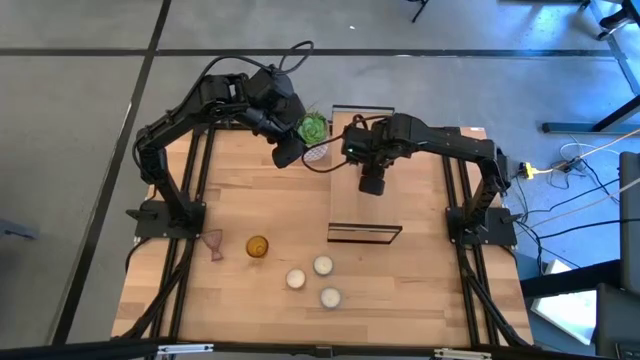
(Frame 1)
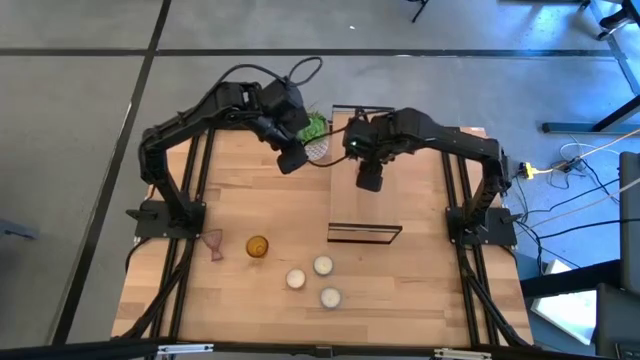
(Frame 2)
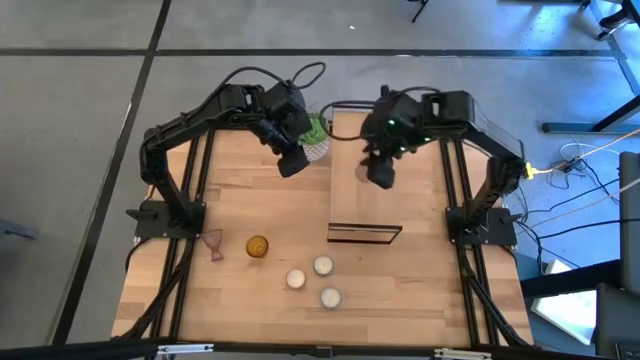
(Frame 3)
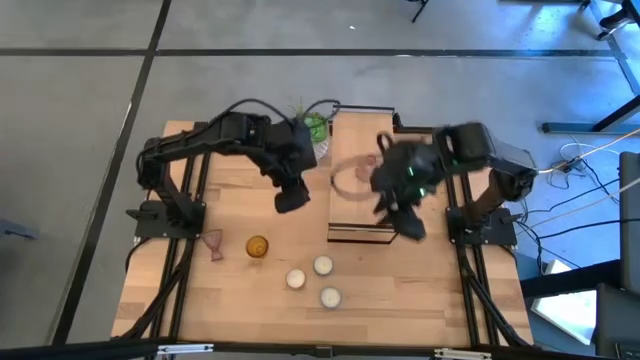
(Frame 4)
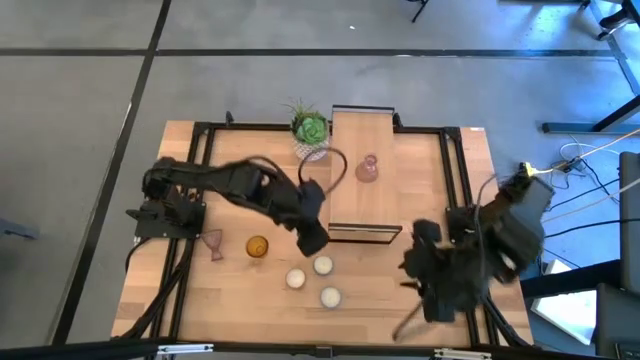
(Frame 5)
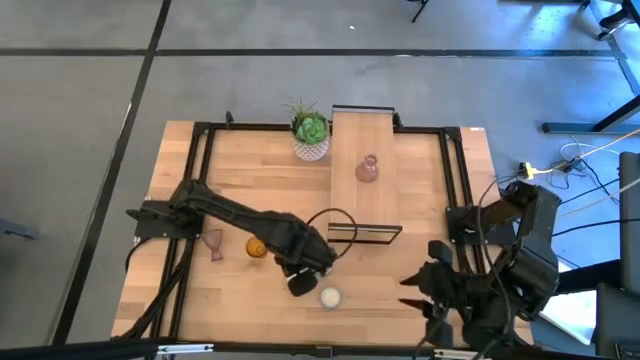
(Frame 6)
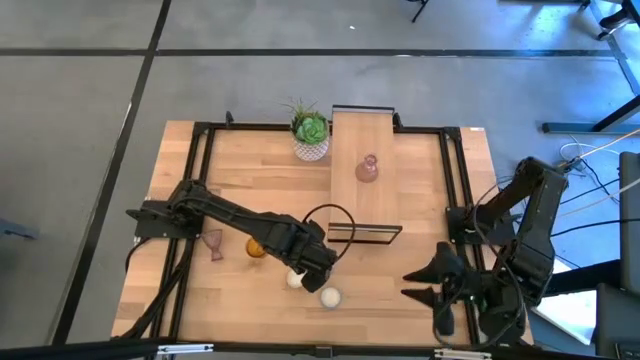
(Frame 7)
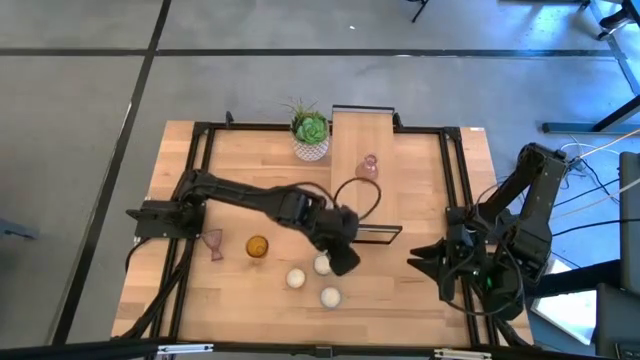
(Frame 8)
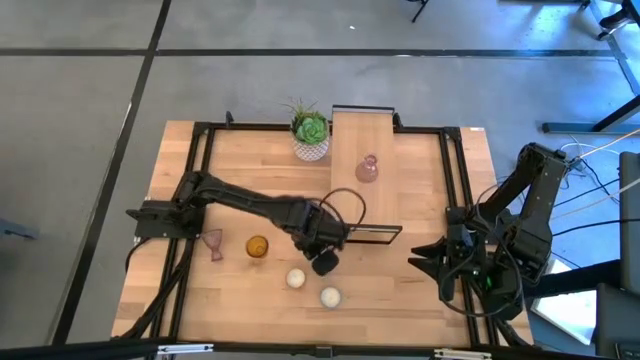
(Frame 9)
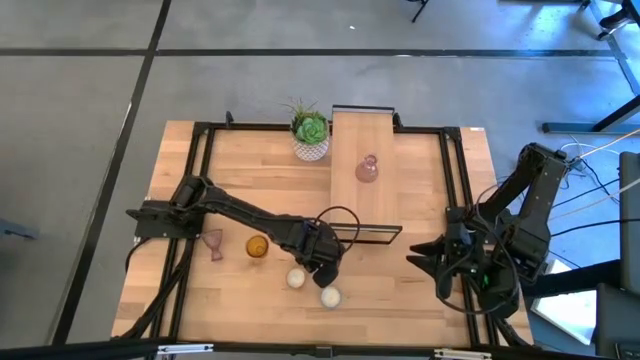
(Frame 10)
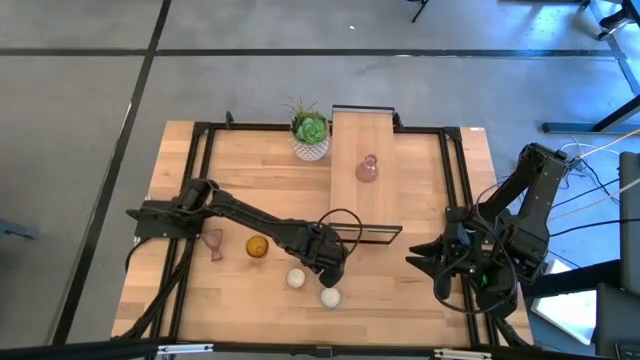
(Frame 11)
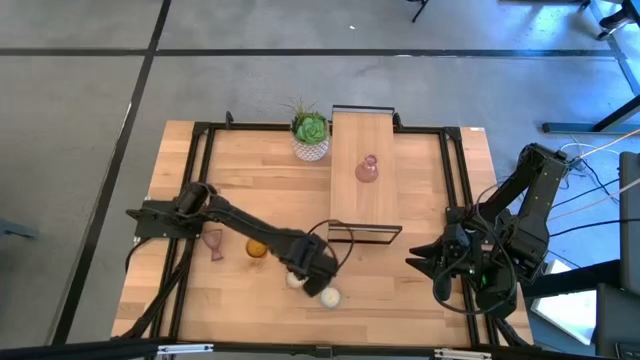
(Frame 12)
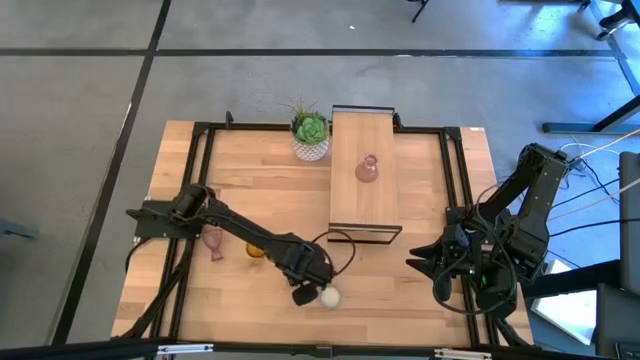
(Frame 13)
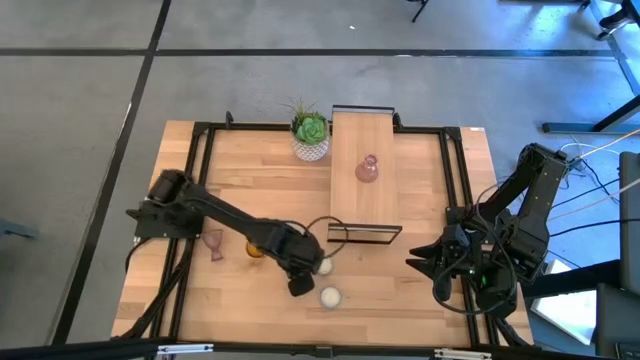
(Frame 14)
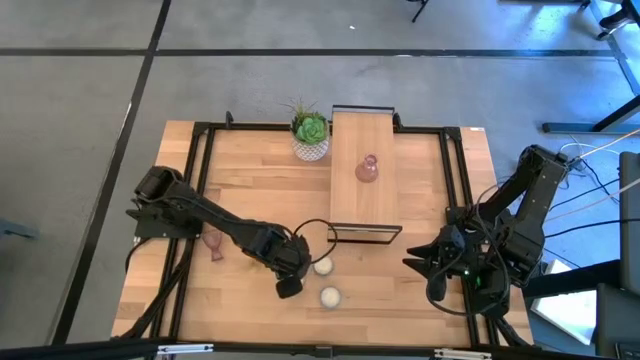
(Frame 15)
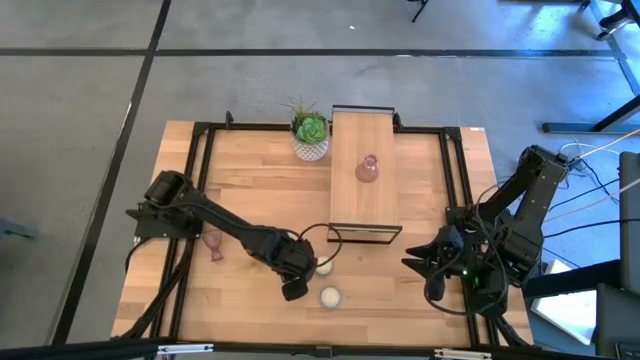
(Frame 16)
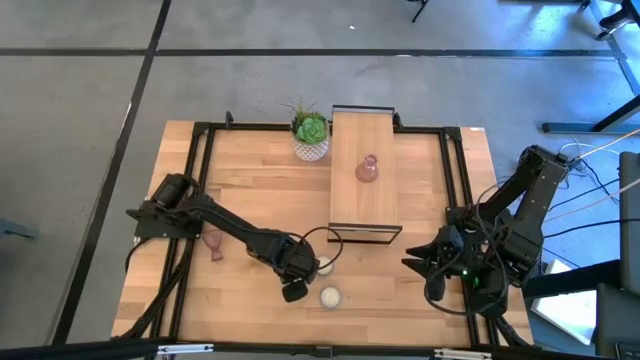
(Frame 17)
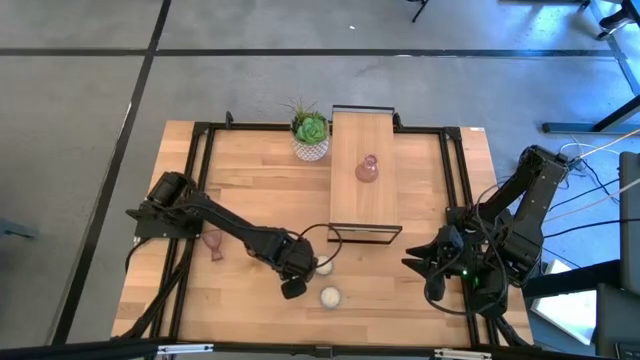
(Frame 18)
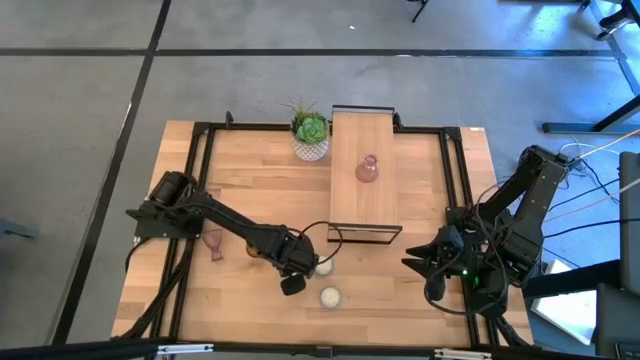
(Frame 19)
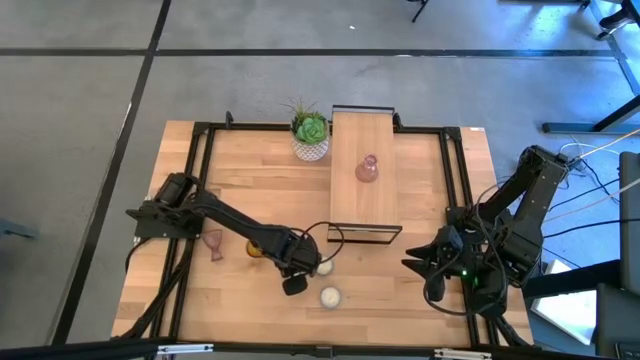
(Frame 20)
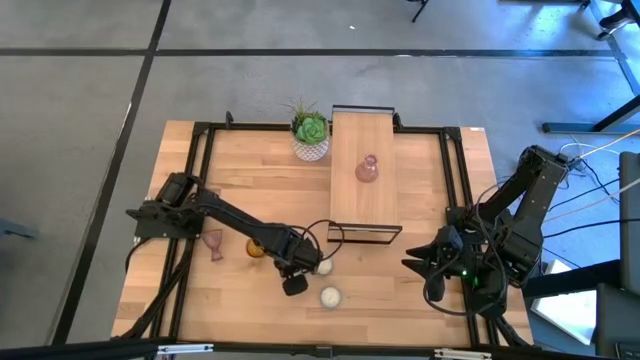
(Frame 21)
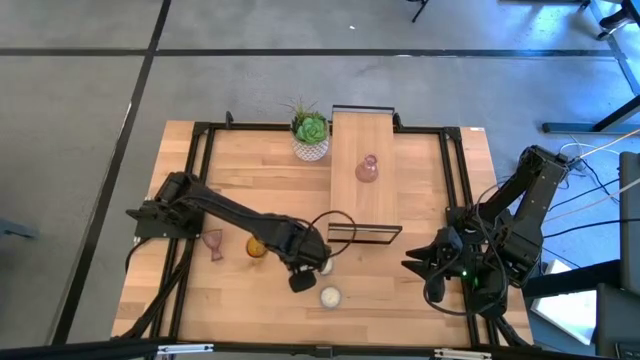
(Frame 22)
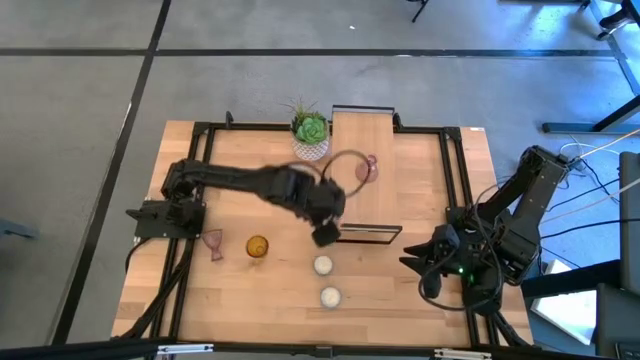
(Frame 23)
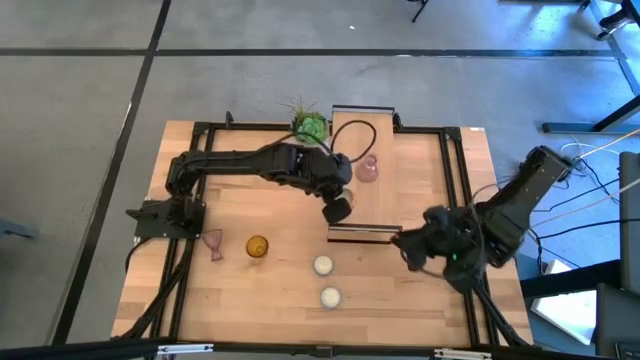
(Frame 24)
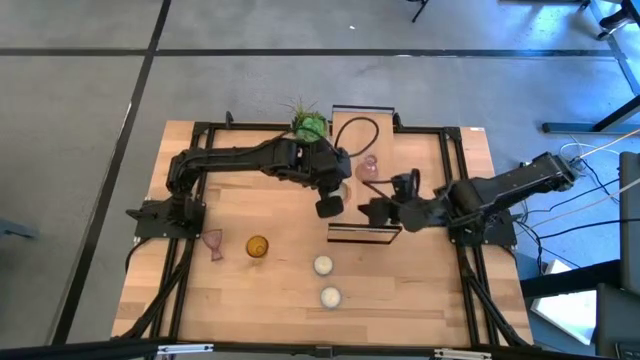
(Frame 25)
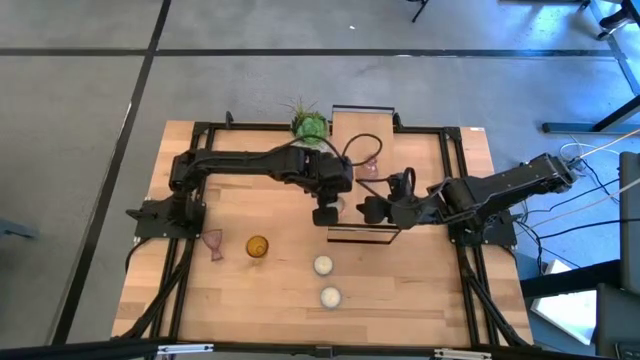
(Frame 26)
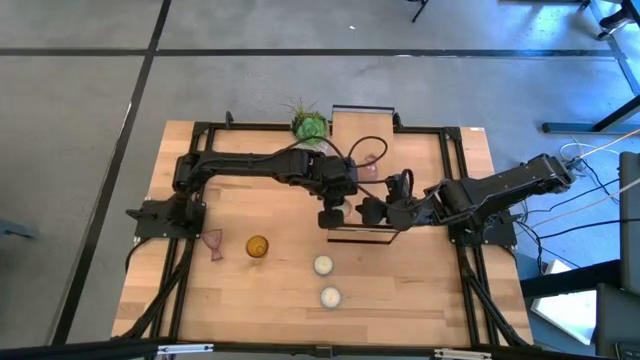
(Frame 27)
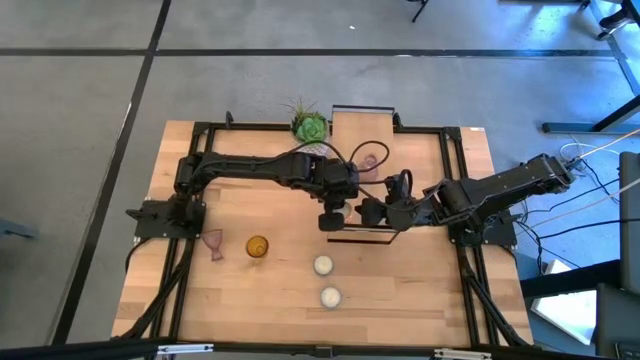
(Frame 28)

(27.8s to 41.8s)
Task: Pick & Place candle stick holders
Put the orange patterned scented candle on the shelf

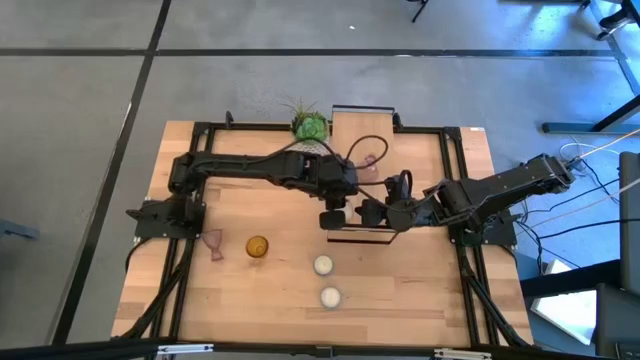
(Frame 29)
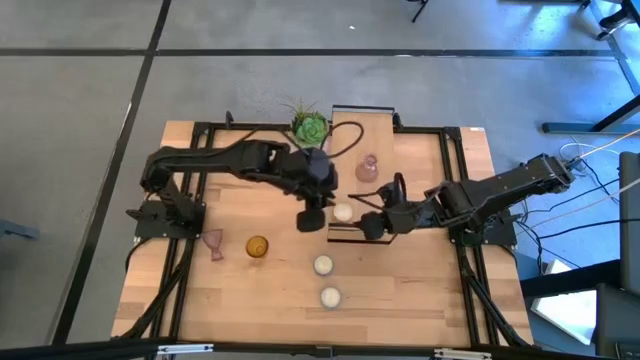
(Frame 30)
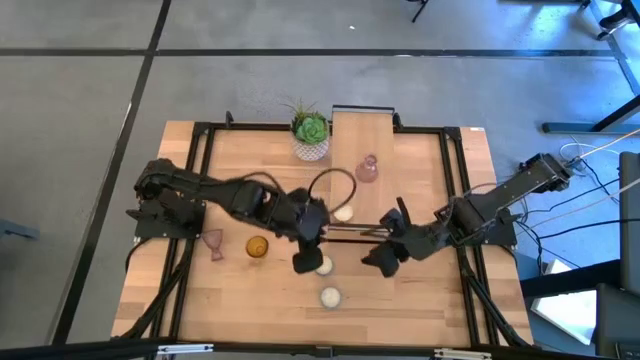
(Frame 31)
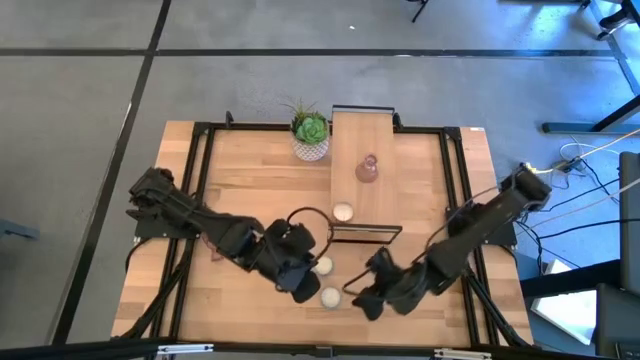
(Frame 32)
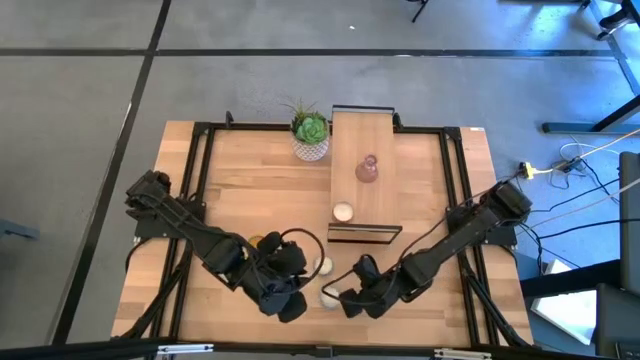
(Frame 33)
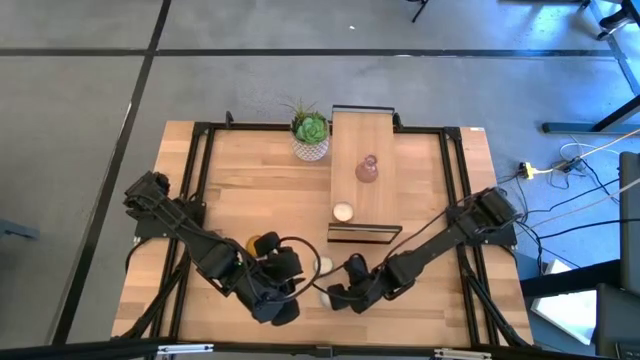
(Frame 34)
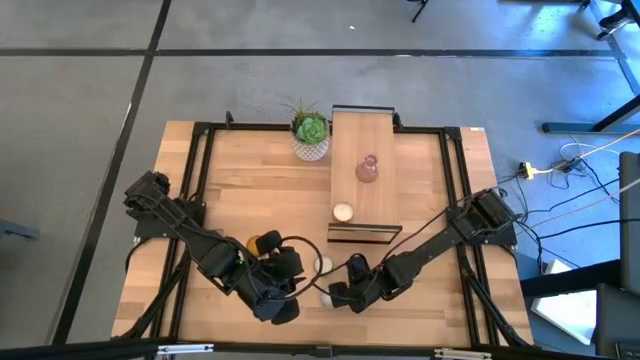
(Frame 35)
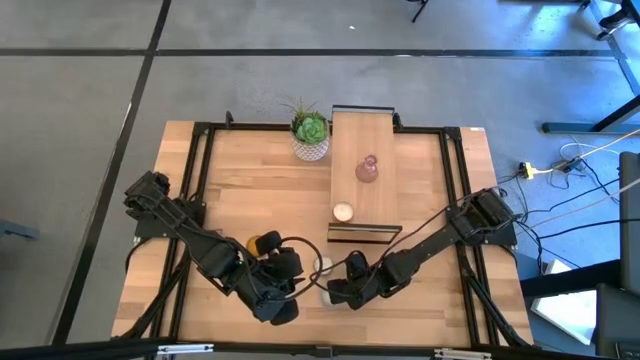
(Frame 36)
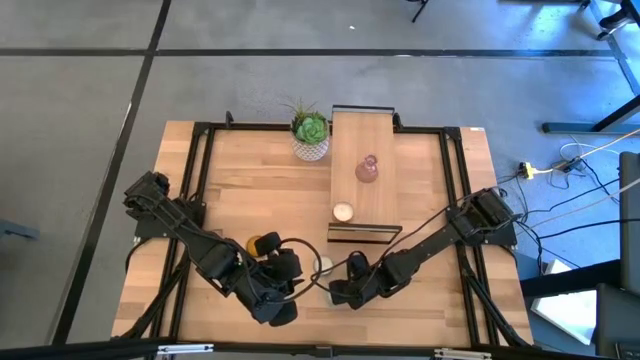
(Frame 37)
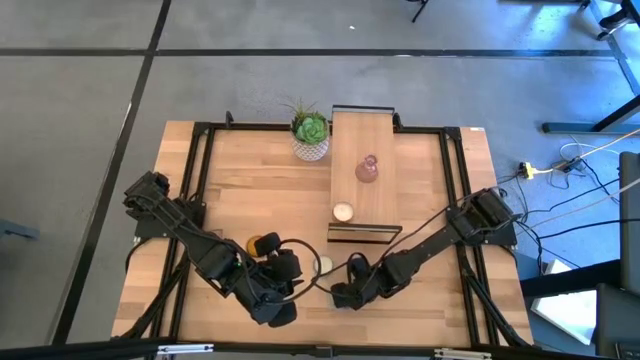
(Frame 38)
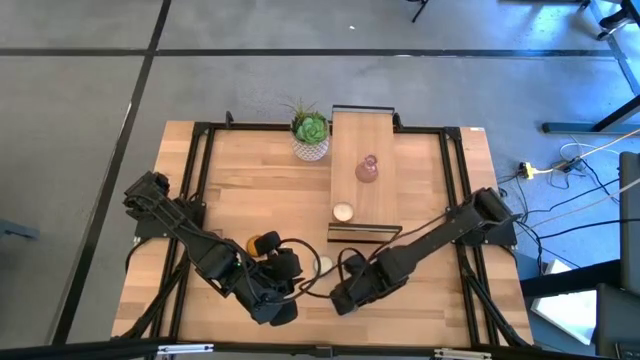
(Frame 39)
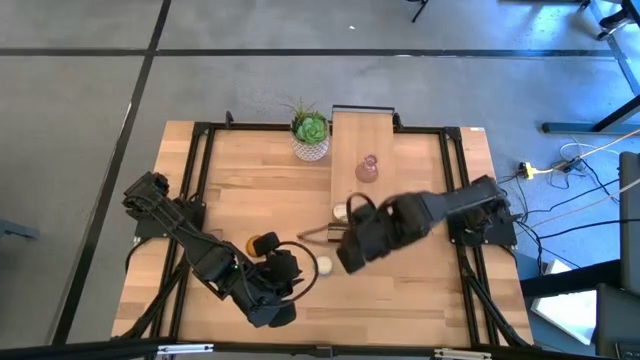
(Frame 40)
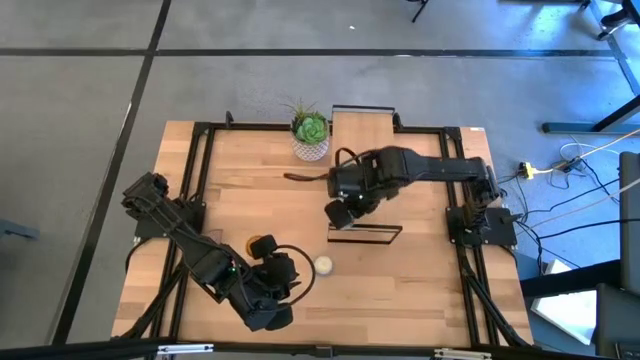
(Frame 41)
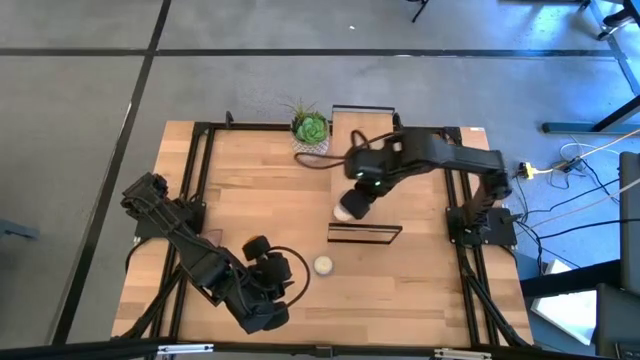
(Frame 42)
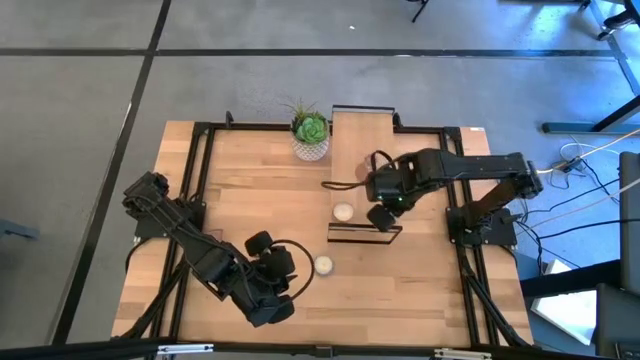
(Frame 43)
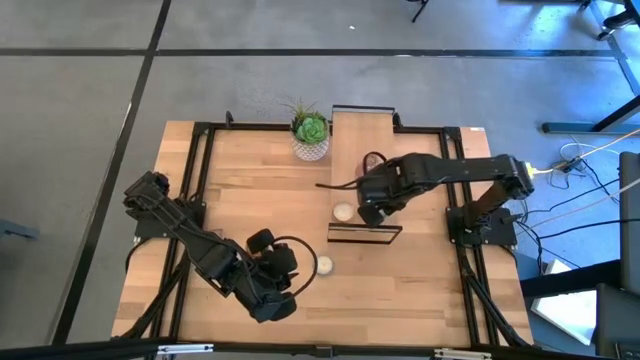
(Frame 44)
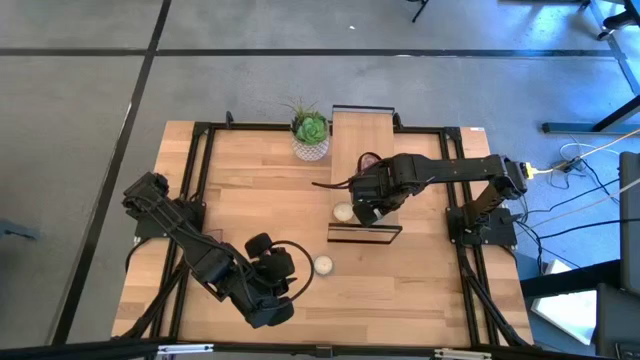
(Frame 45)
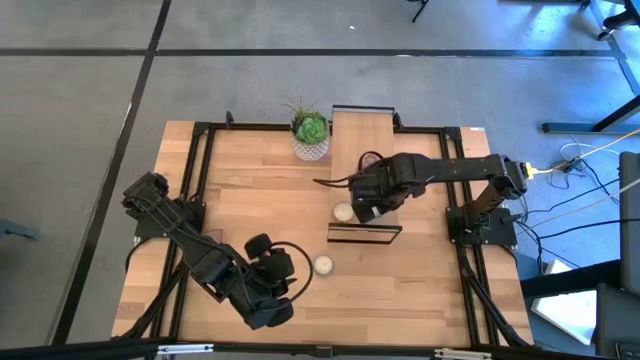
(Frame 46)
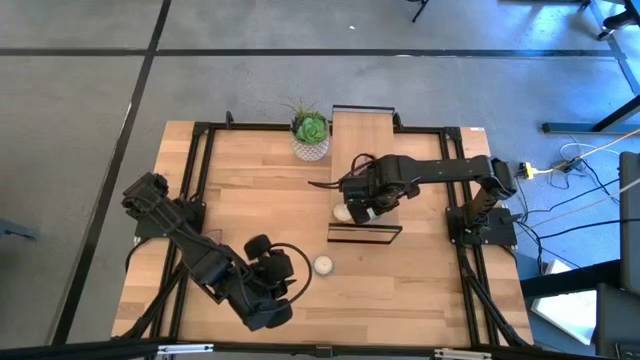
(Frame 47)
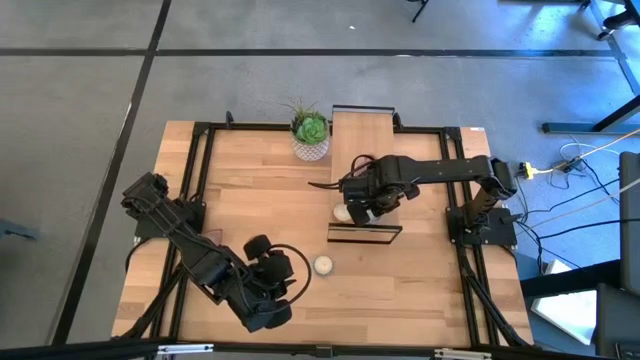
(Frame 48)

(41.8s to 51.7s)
Put the light blue patterned scented candle on the shelf aligned with the orange patterned scented candle
